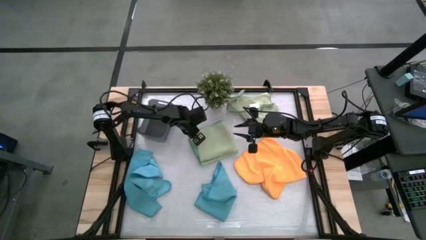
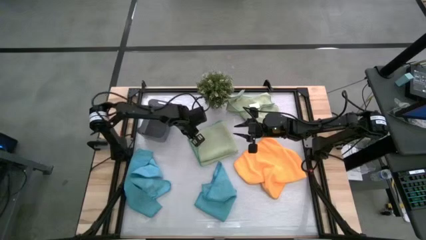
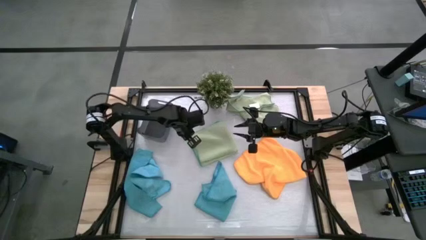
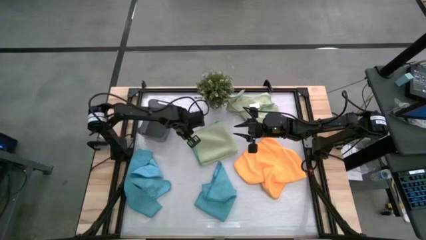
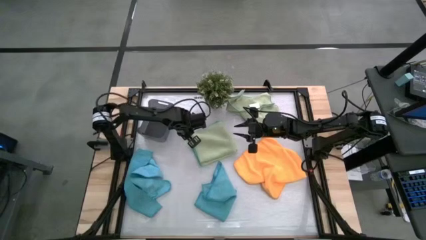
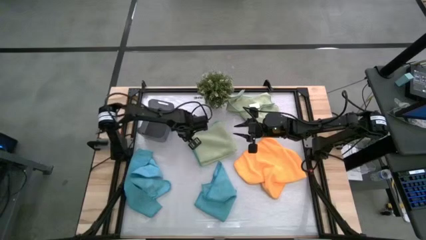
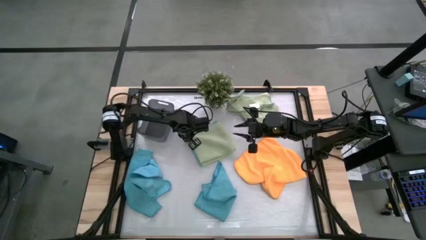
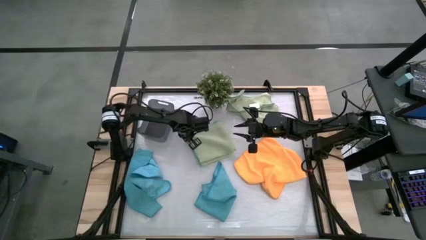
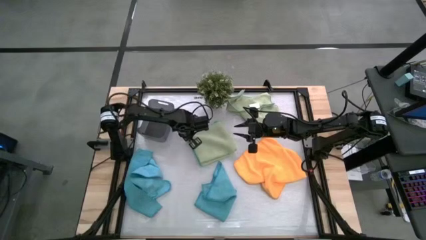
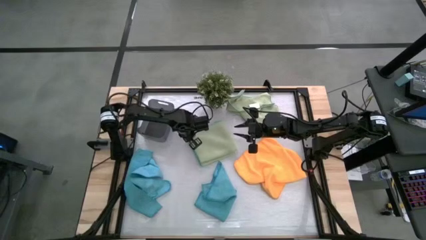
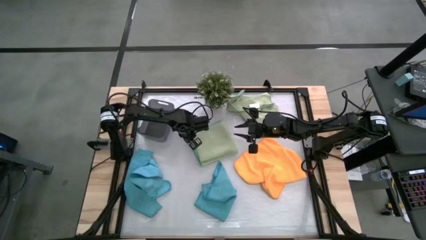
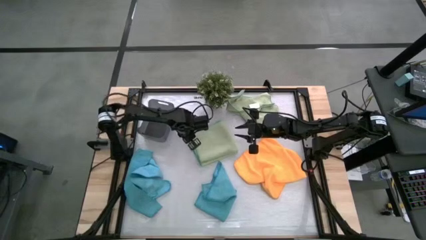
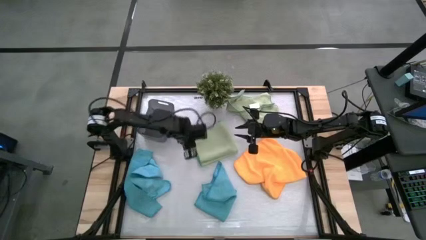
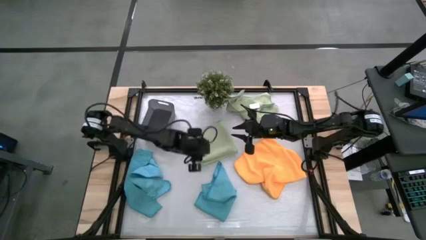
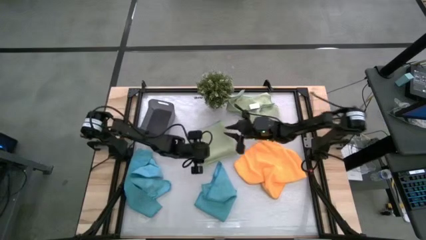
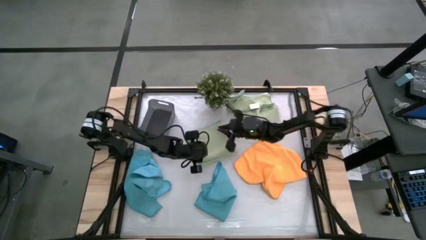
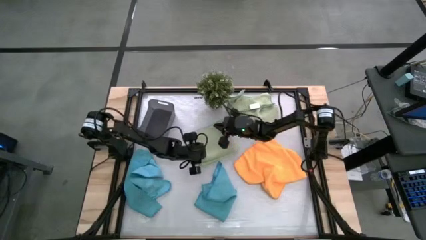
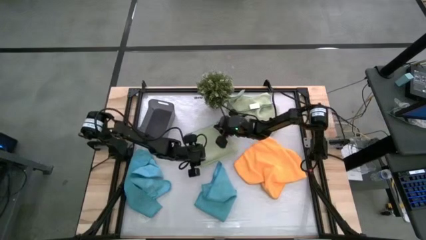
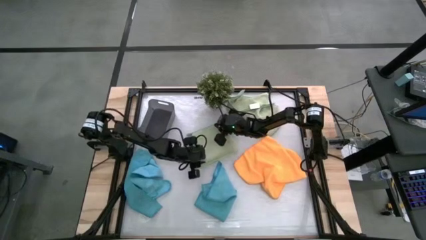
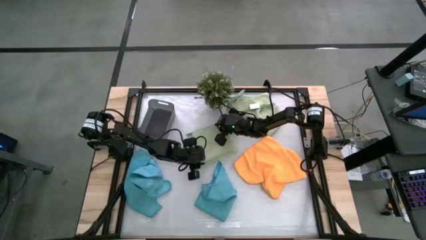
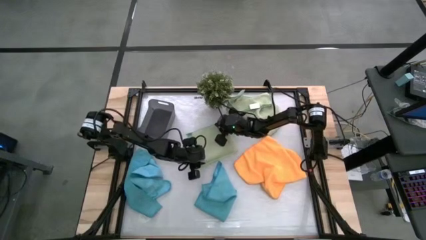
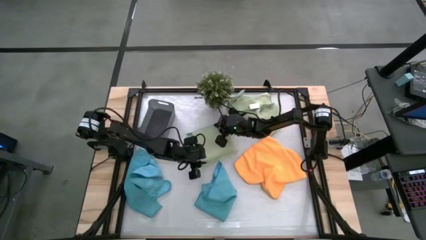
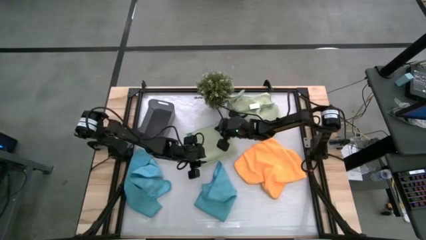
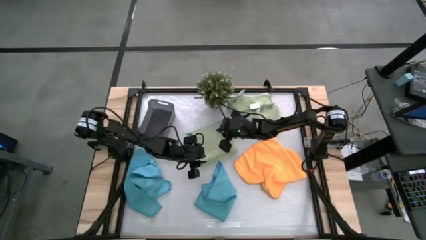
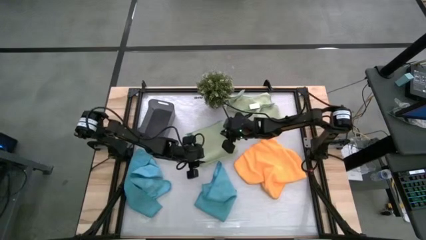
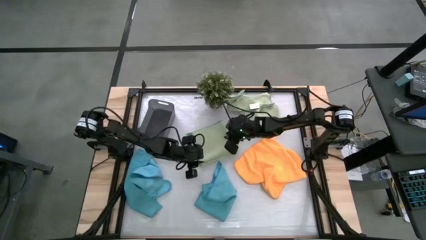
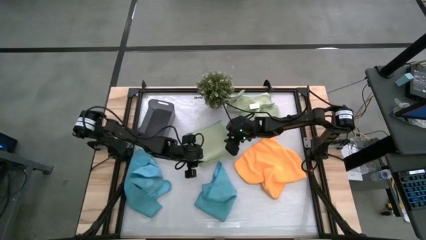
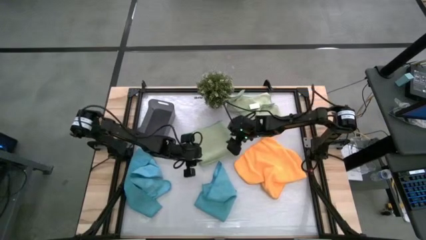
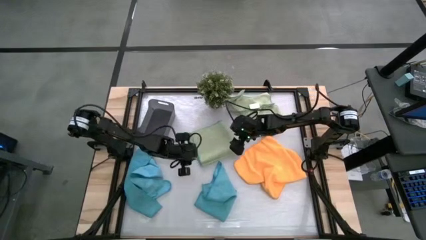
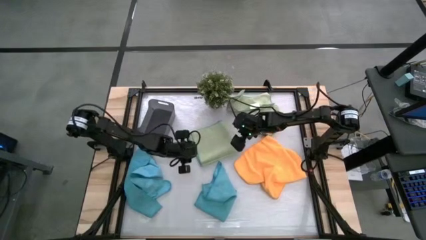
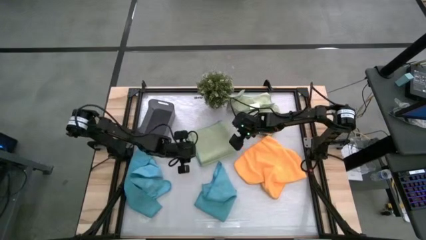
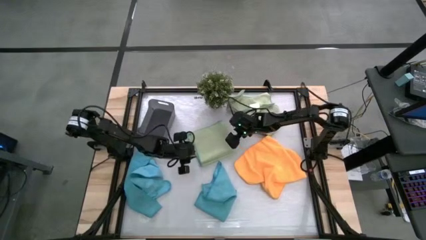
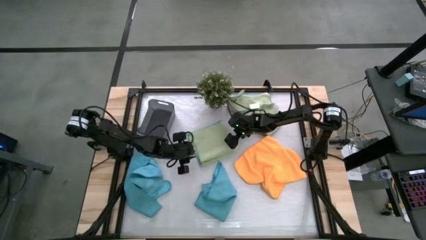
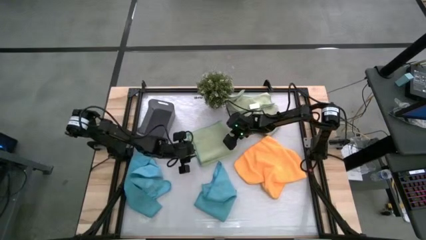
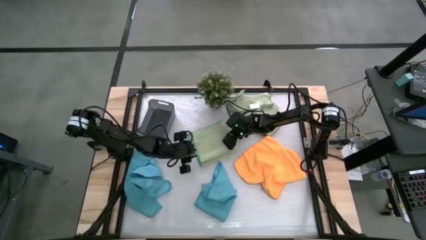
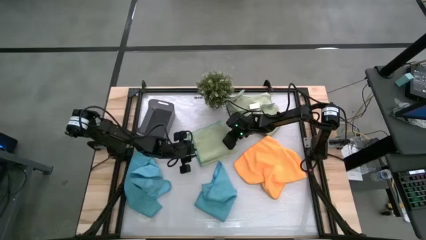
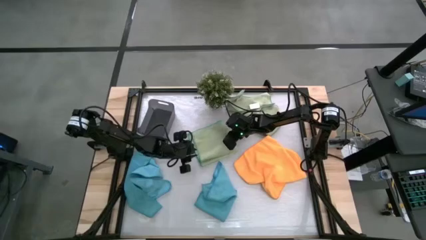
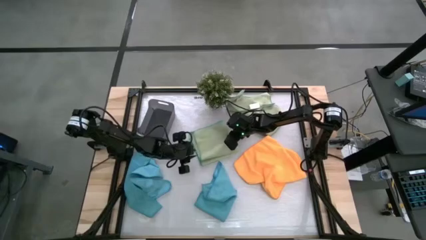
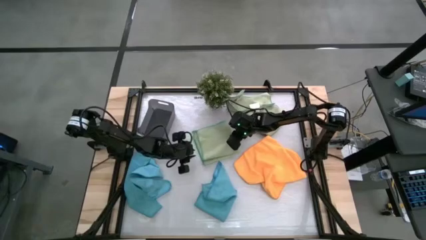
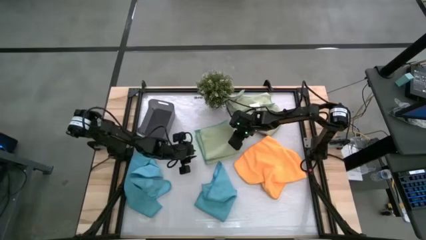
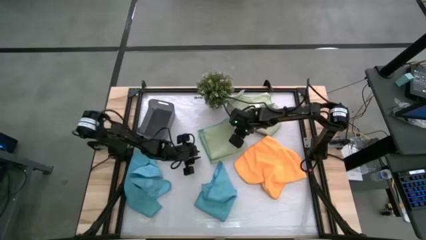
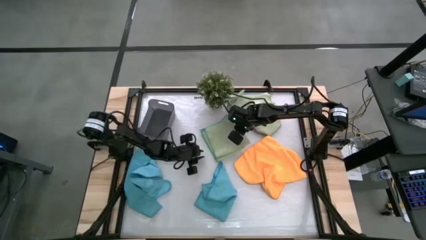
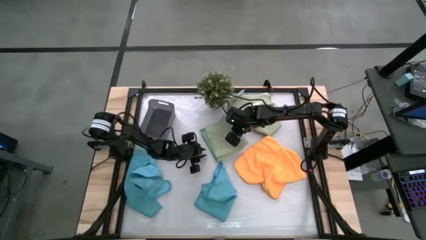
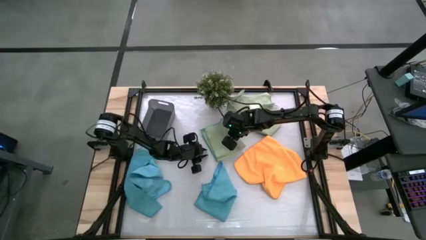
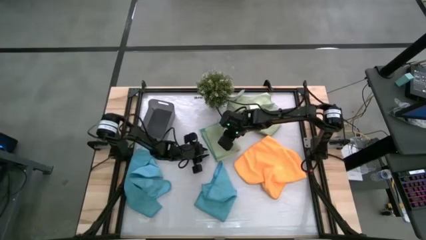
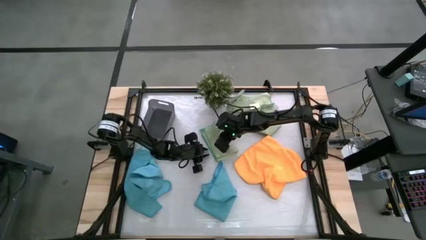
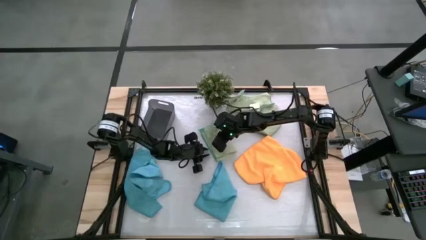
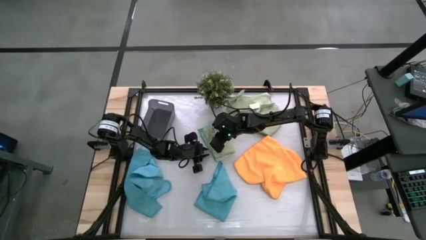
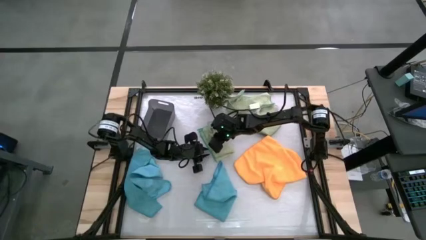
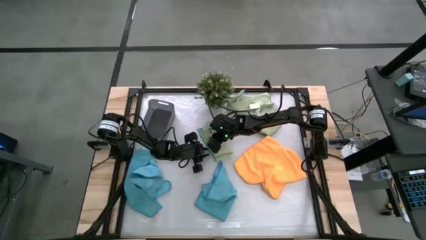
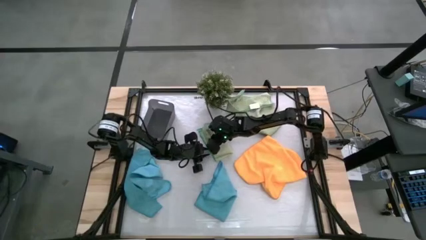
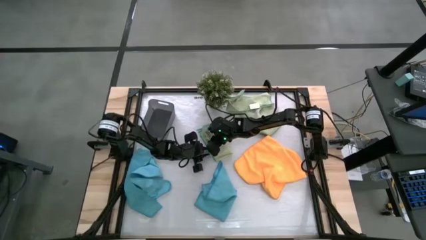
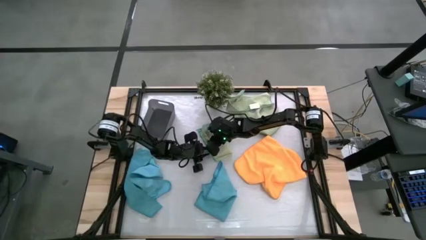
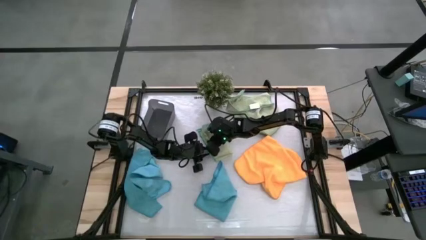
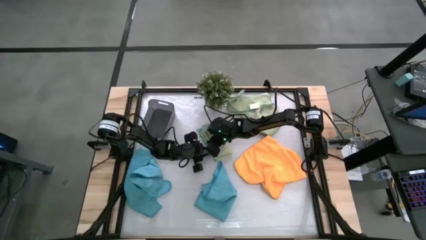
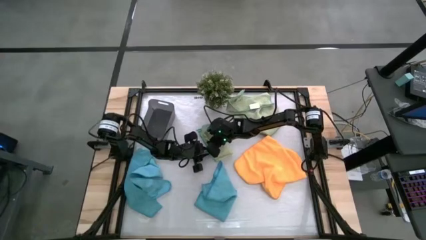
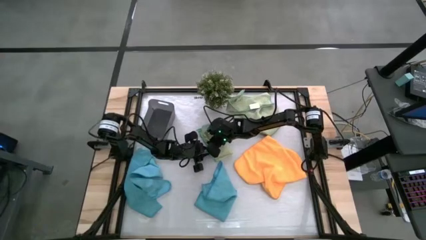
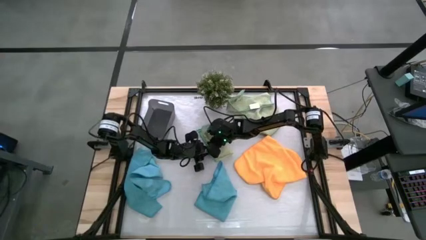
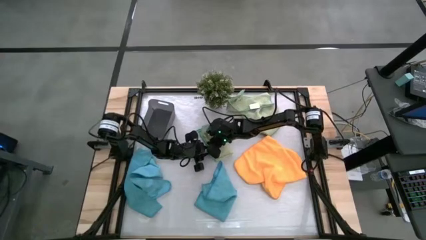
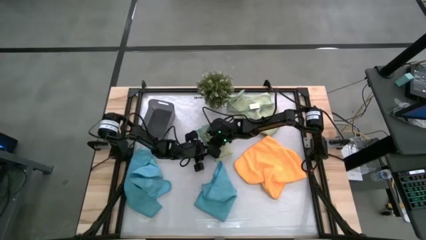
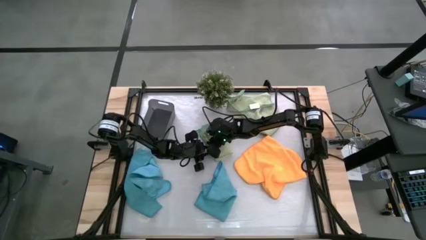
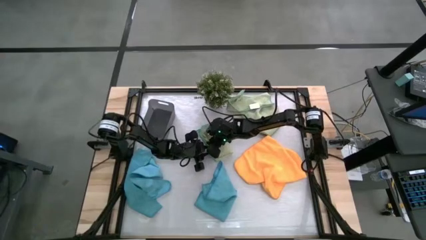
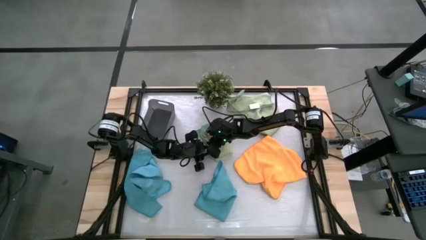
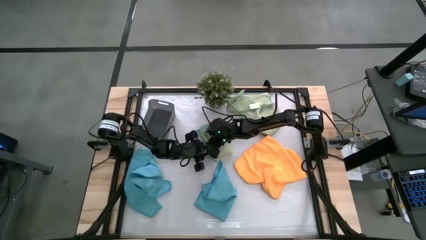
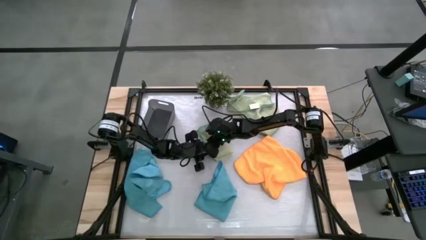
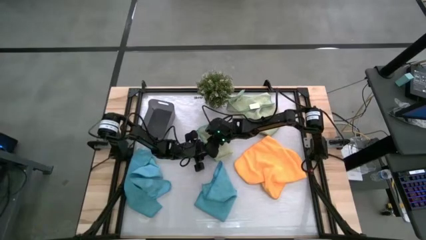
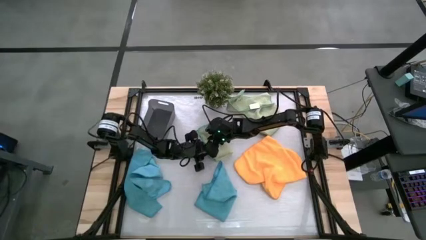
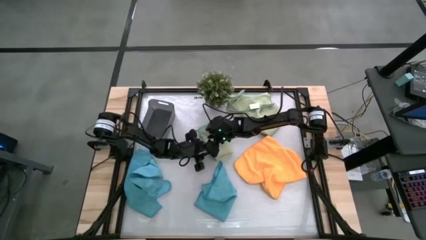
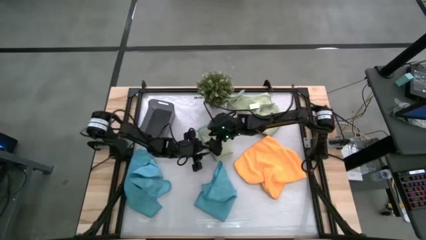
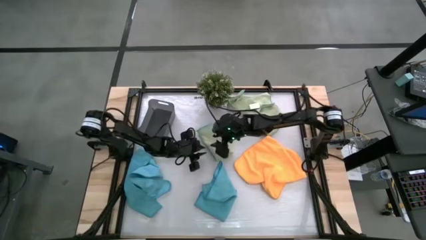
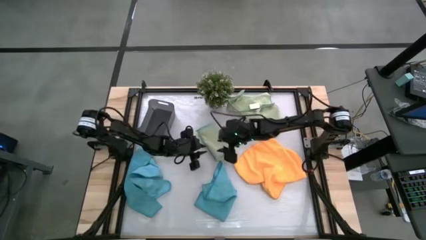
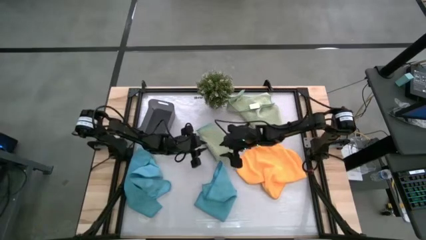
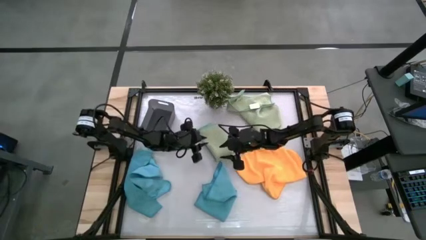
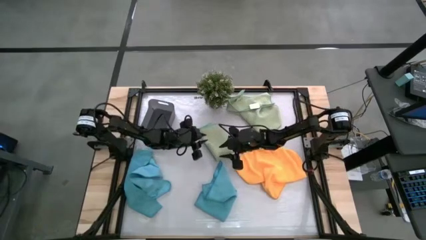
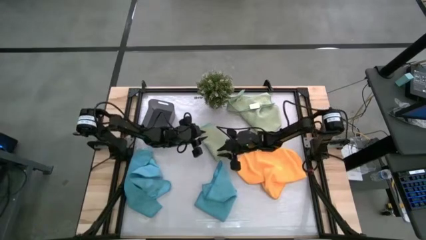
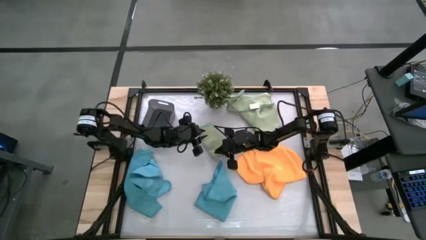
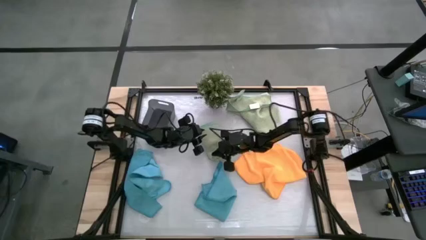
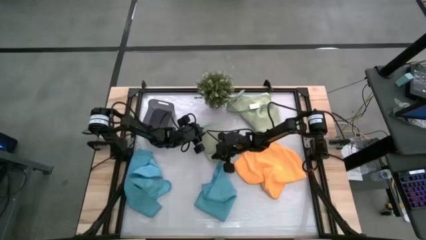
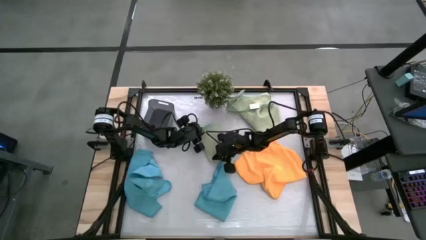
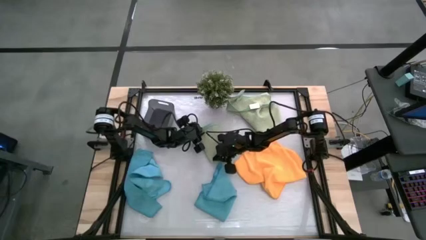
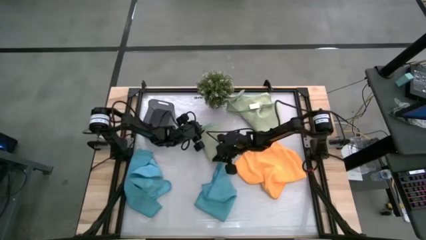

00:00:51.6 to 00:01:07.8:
Task: Fold microfiber towels
Fold the left green microfiber cloth
